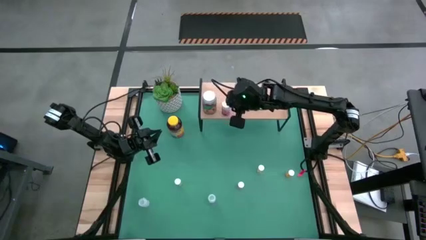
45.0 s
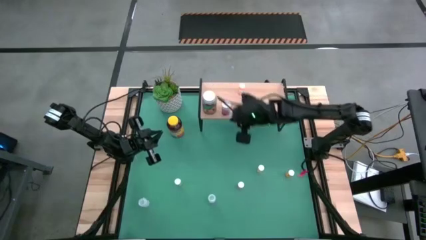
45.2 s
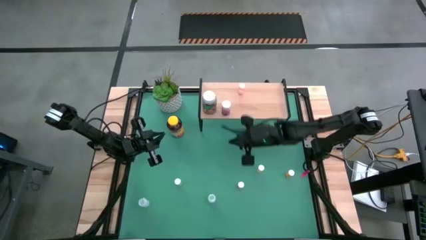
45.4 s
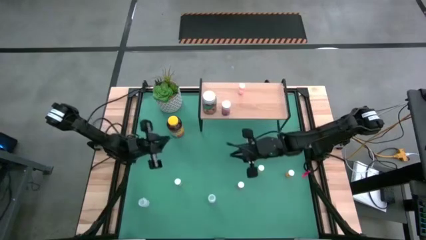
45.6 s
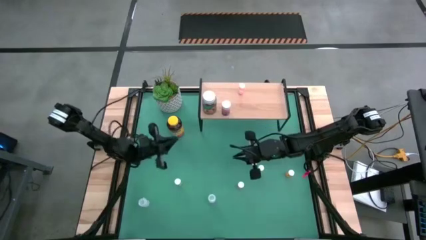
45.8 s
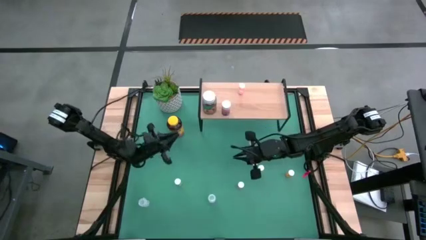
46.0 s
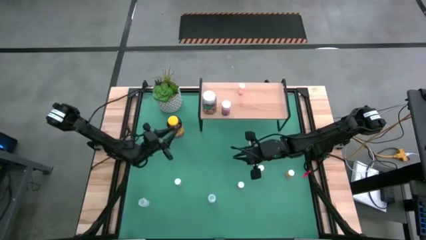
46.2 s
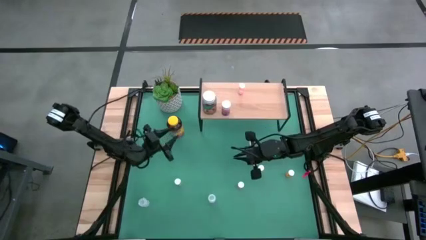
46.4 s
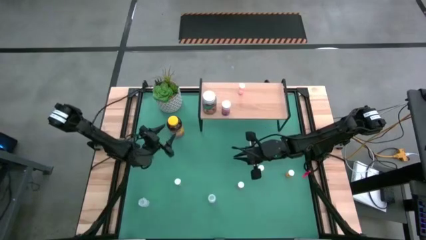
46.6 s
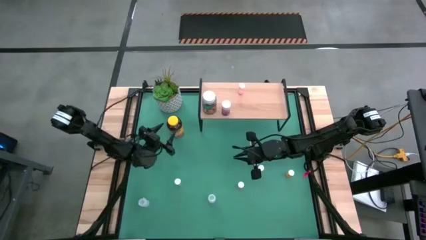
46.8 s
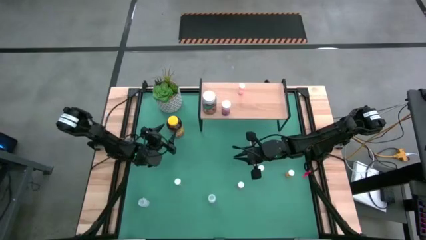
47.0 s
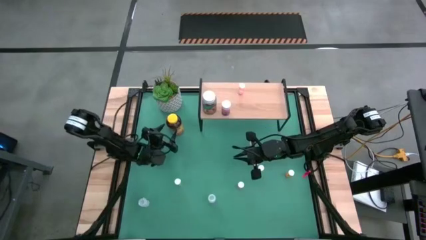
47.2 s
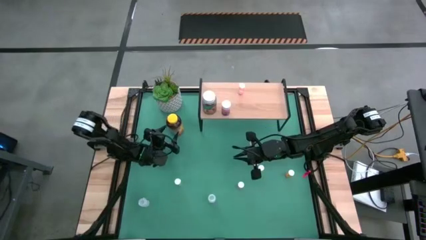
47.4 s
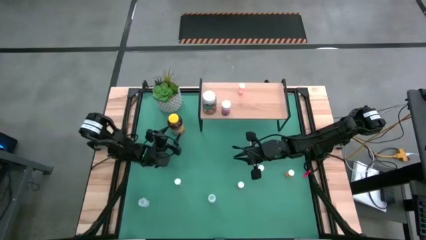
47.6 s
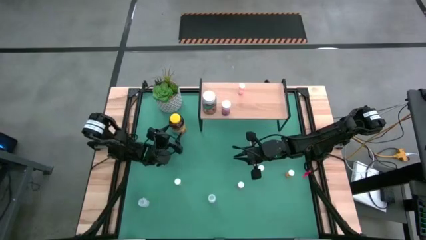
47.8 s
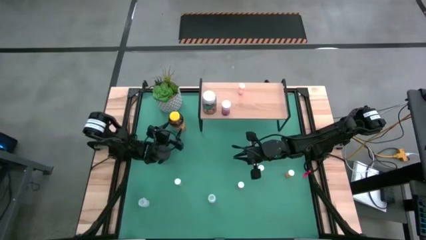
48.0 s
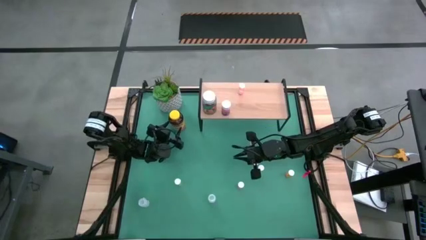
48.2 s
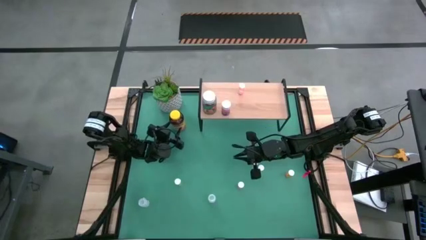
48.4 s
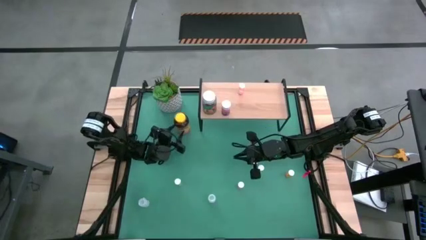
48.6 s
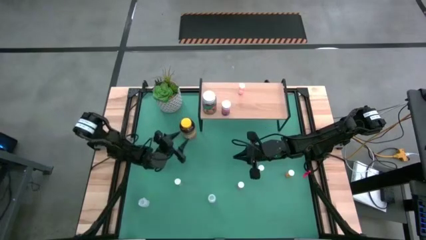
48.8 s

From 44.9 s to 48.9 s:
Task: Pick and place medicine bottles onto shelf by color
Put the large yellow medicine bottle on the shelf

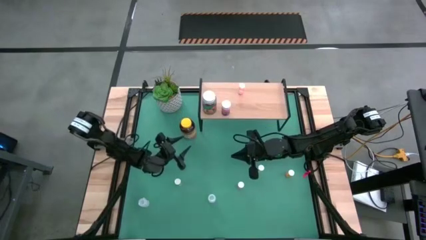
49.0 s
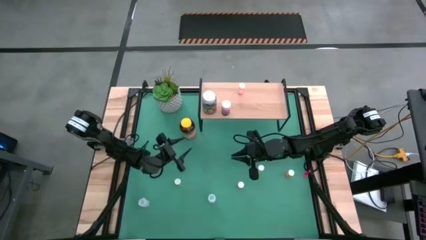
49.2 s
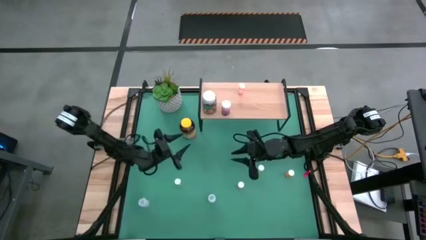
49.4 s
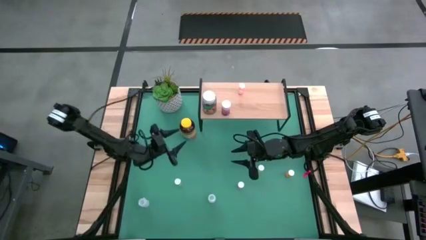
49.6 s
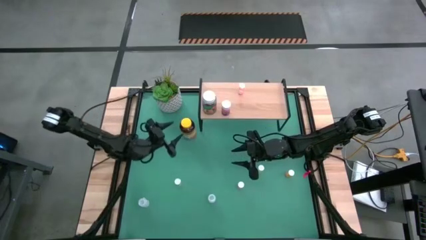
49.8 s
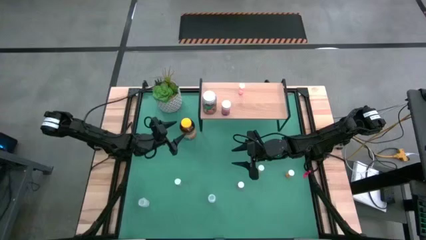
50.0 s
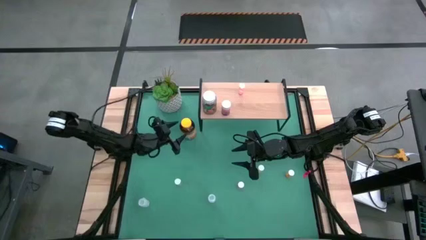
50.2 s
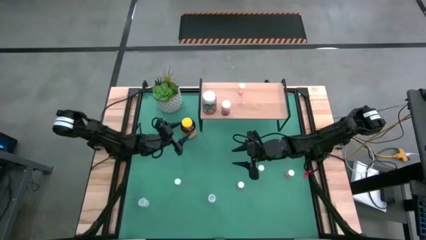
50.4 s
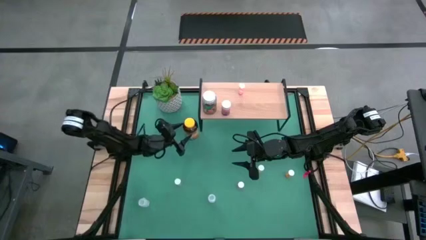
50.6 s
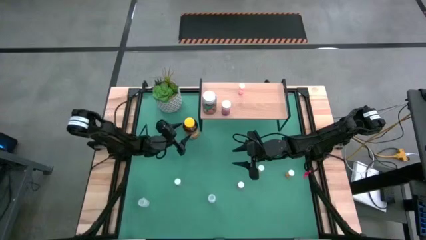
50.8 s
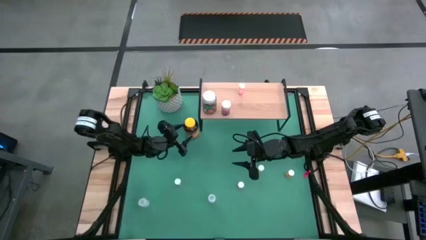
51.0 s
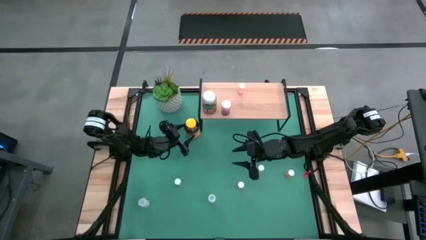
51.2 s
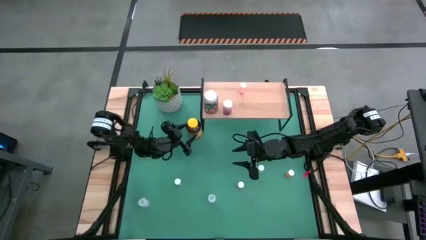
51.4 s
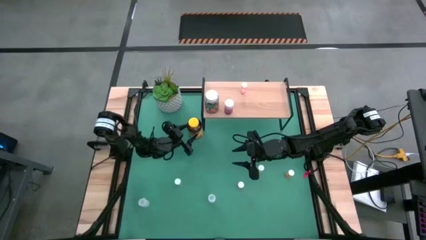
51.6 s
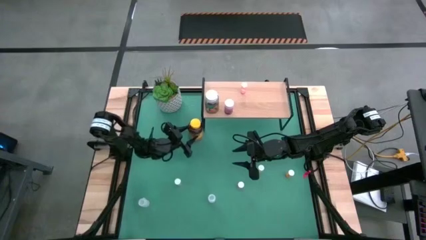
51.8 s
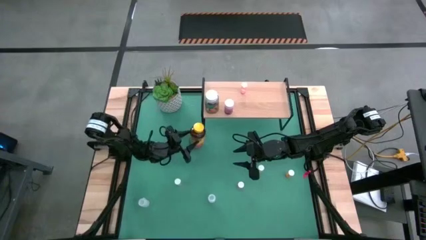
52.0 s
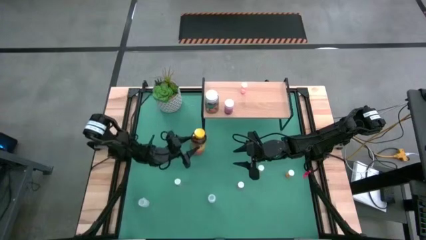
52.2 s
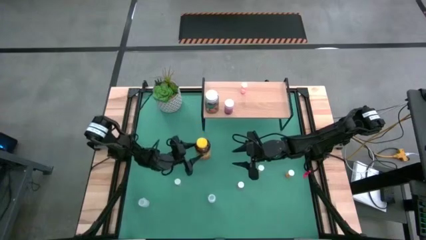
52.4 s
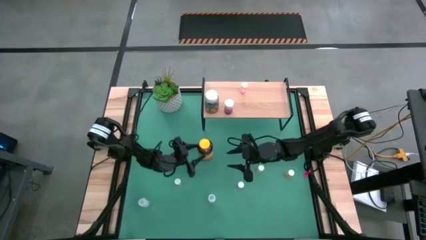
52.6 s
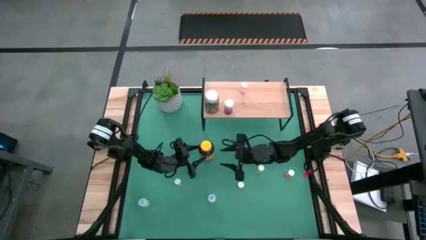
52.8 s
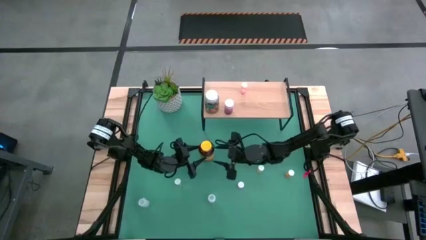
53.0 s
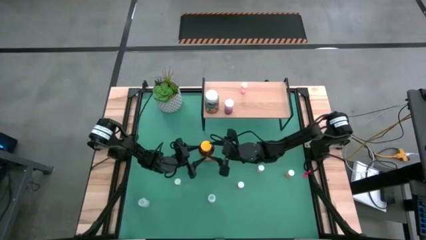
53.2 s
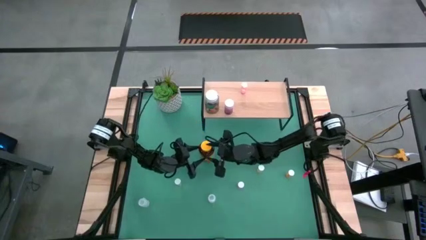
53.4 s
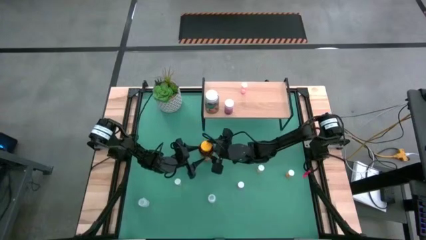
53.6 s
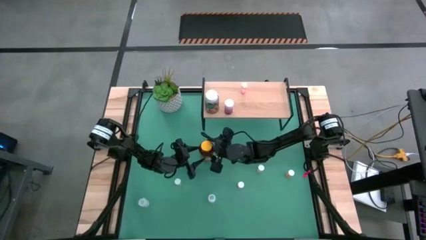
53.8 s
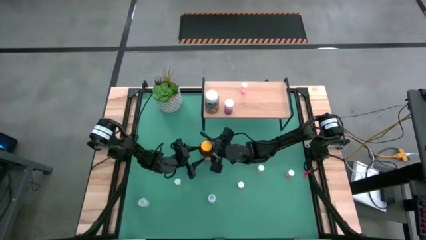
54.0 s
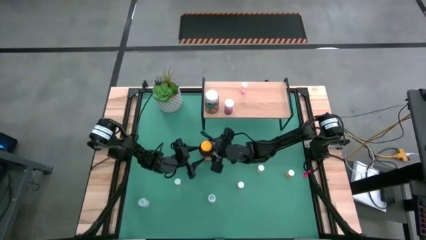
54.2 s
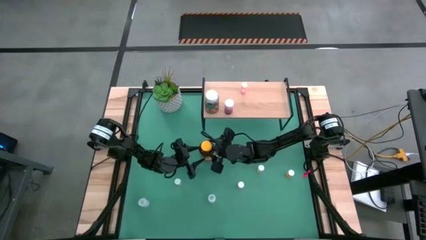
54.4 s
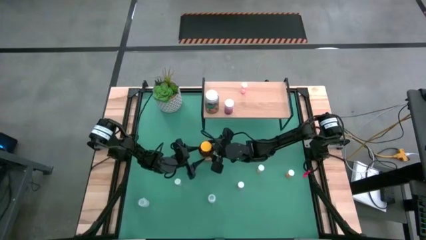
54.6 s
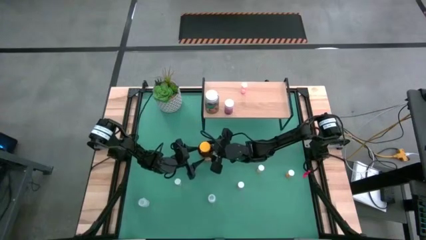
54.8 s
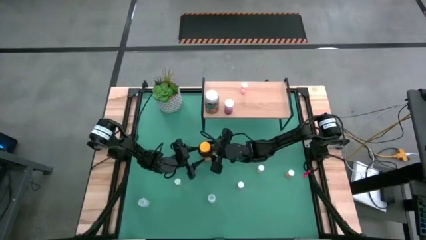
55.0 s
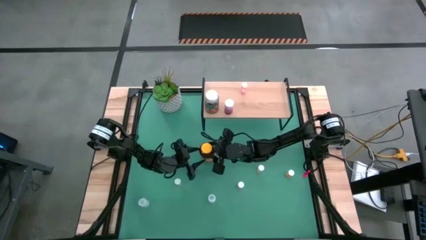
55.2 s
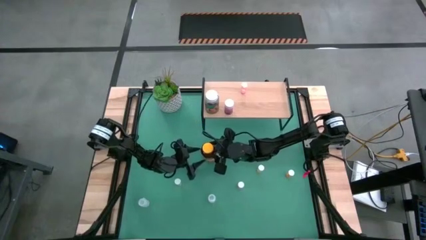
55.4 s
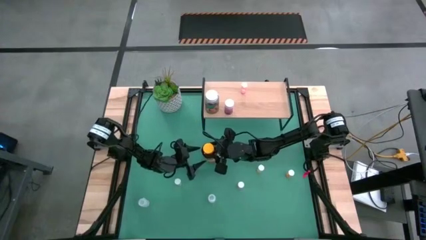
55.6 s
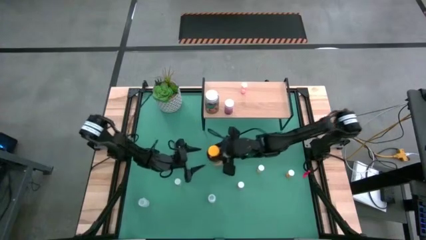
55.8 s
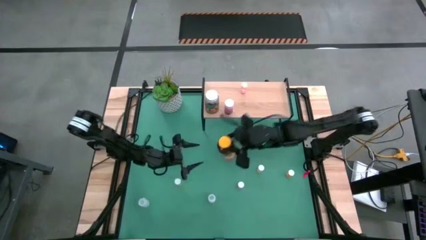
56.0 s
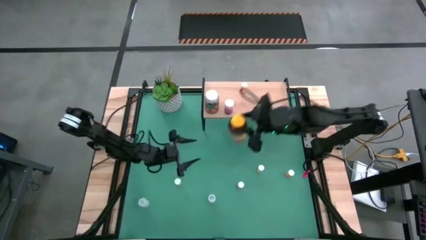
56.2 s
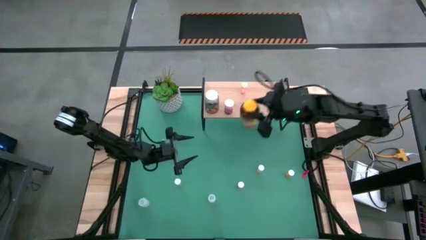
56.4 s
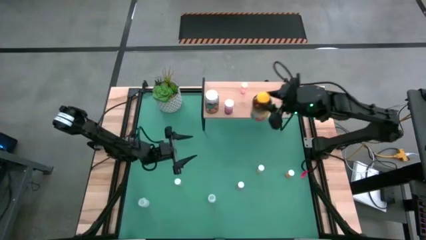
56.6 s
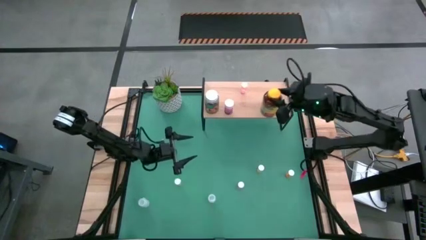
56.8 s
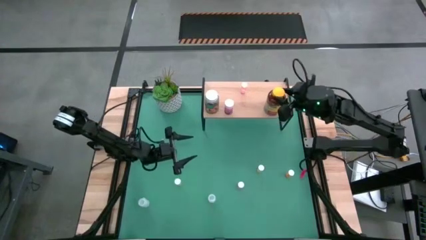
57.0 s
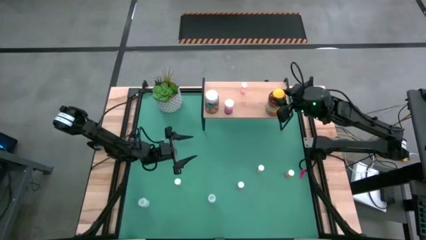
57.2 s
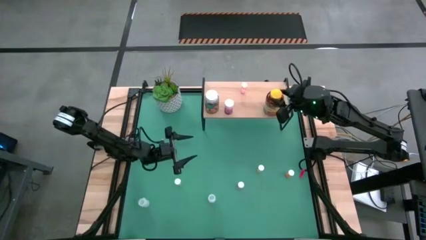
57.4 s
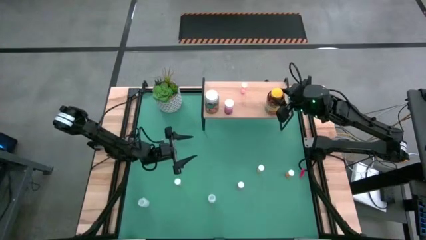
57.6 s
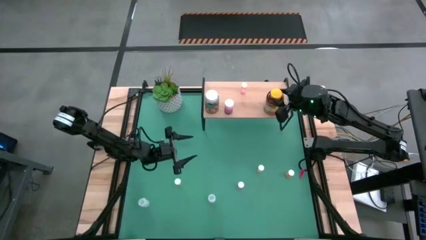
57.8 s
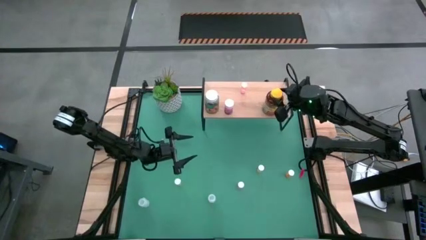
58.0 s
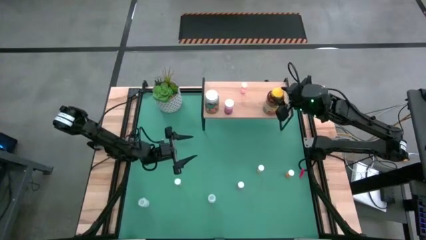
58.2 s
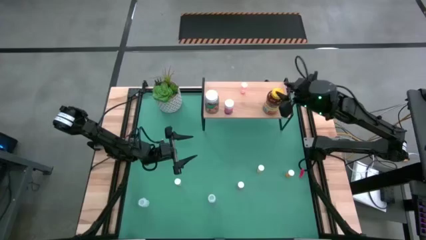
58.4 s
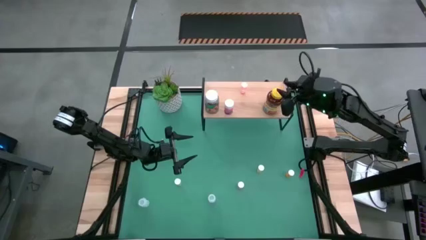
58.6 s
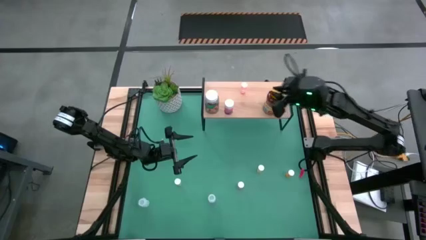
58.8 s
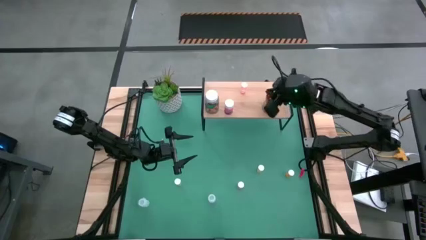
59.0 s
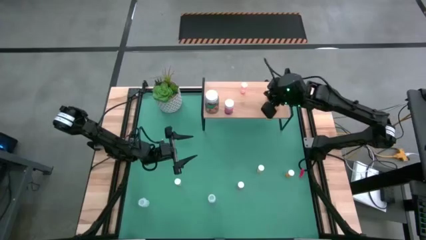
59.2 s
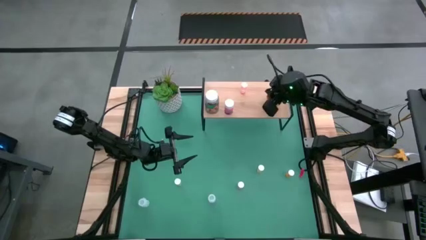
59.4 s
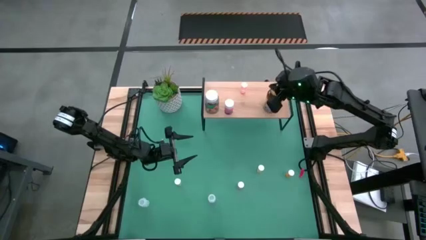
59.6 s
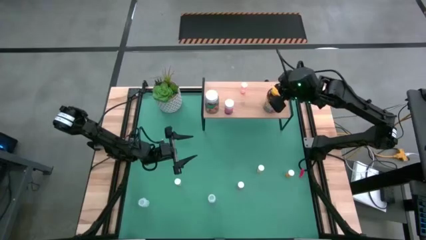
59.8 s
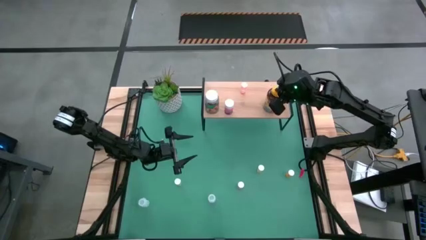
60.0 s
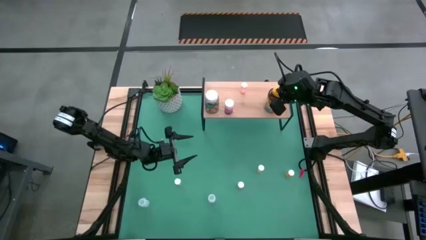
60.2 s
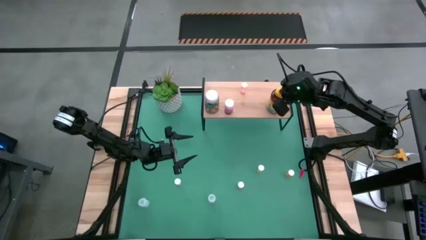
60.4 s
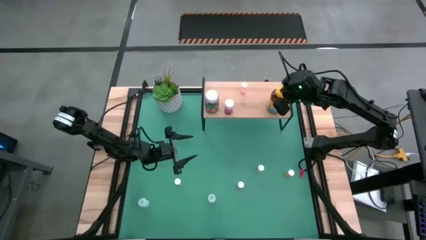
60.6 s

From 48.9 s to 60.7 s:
Put the large yellow medicine bottle on the shelf
